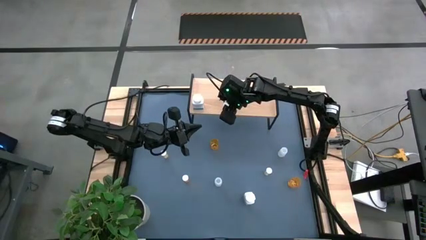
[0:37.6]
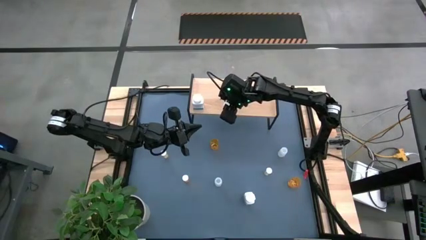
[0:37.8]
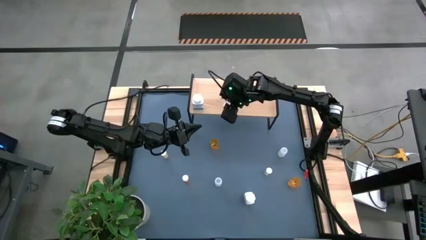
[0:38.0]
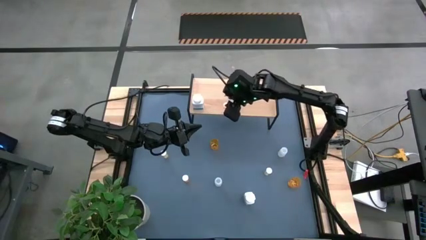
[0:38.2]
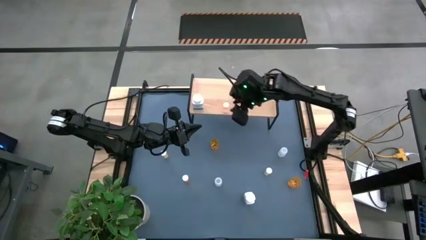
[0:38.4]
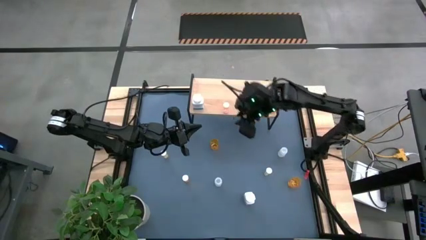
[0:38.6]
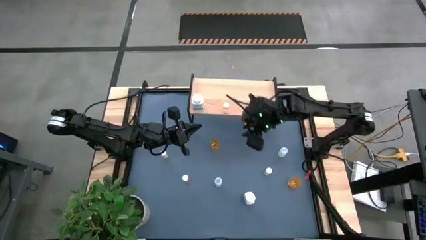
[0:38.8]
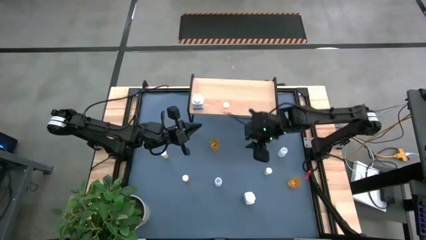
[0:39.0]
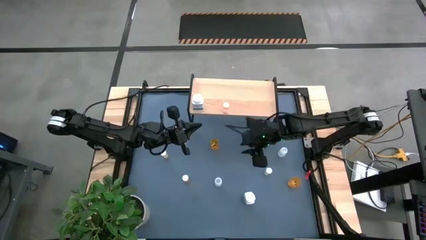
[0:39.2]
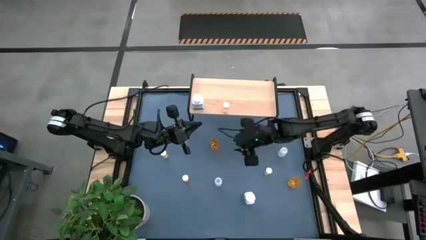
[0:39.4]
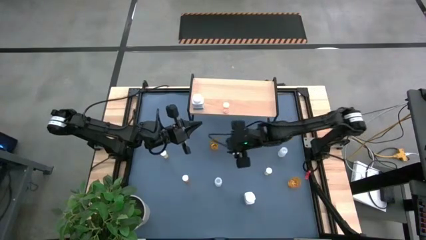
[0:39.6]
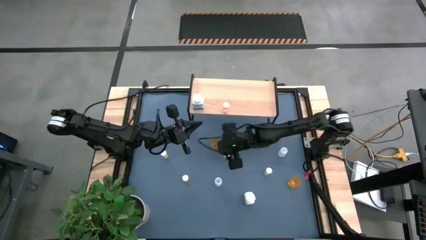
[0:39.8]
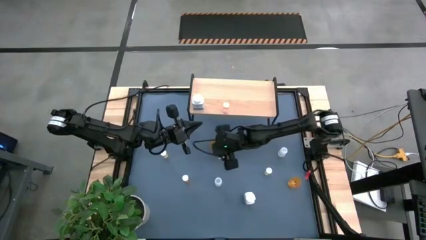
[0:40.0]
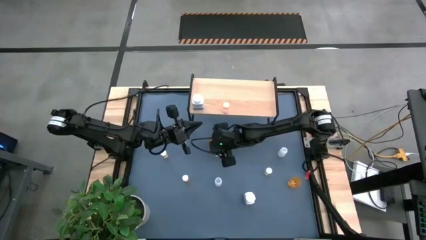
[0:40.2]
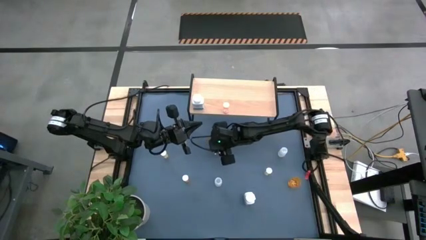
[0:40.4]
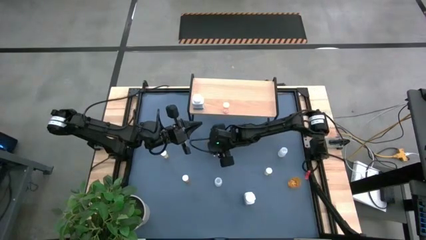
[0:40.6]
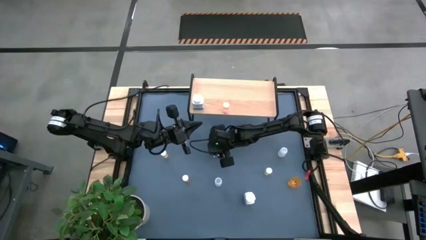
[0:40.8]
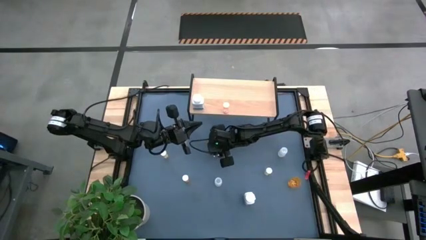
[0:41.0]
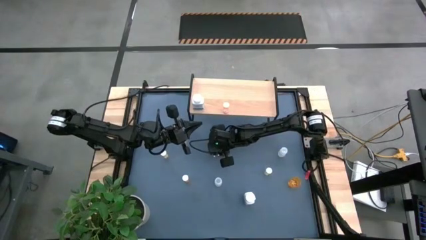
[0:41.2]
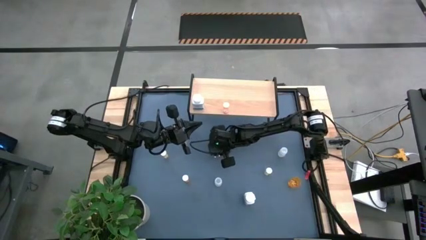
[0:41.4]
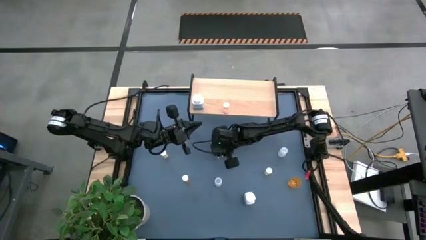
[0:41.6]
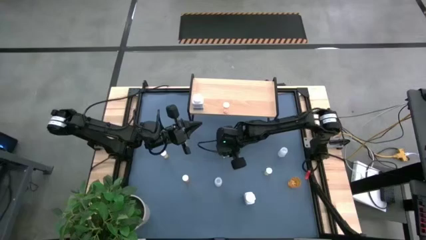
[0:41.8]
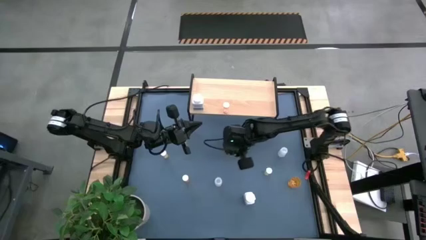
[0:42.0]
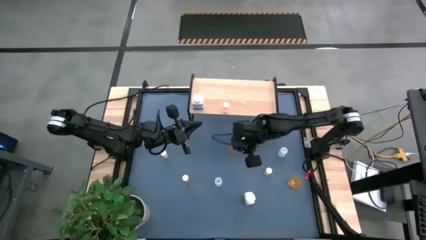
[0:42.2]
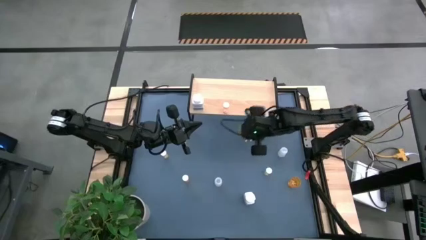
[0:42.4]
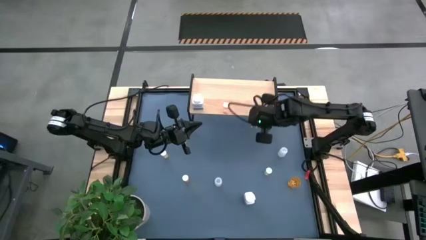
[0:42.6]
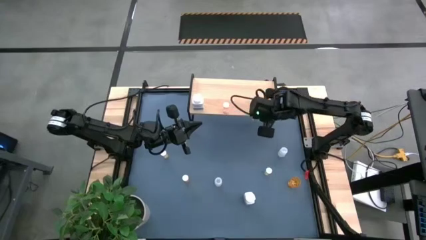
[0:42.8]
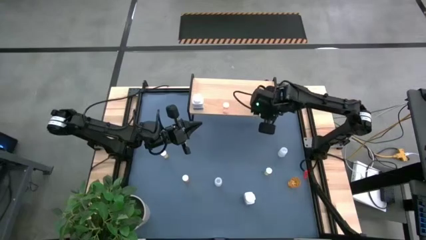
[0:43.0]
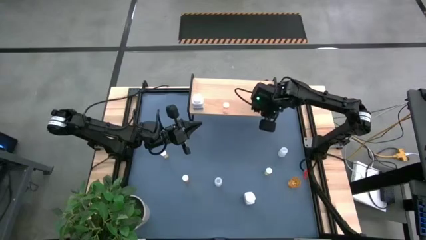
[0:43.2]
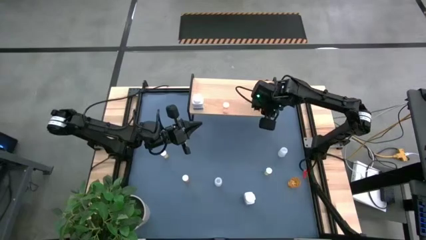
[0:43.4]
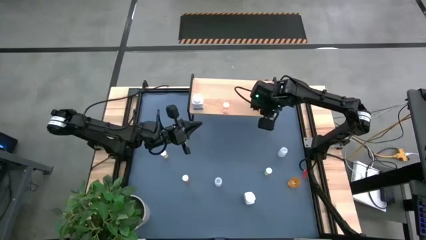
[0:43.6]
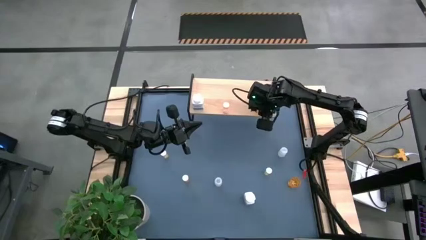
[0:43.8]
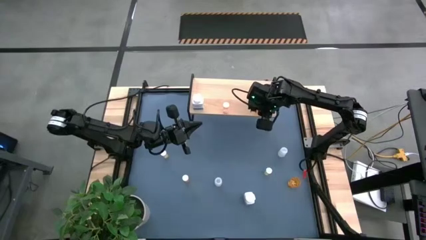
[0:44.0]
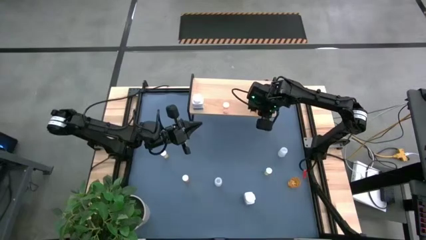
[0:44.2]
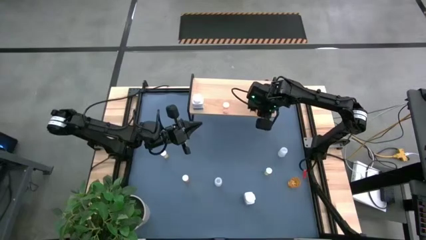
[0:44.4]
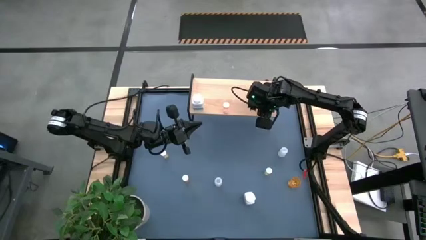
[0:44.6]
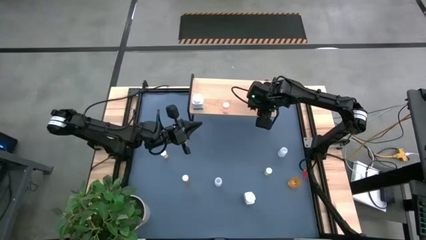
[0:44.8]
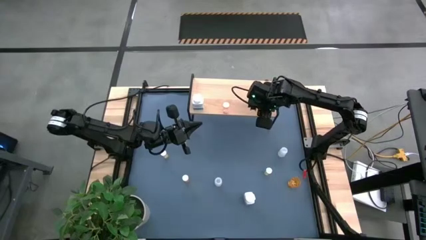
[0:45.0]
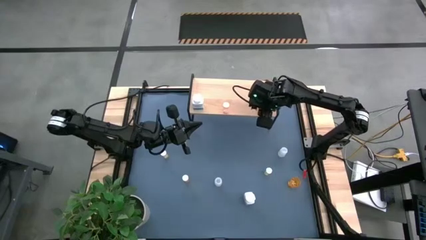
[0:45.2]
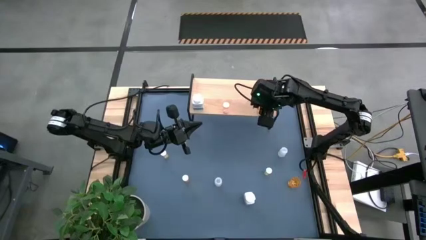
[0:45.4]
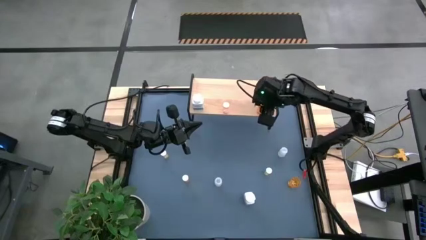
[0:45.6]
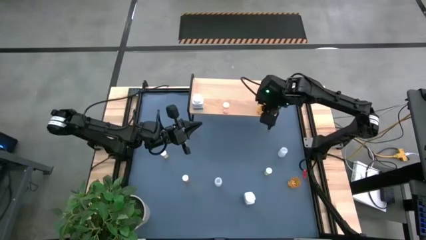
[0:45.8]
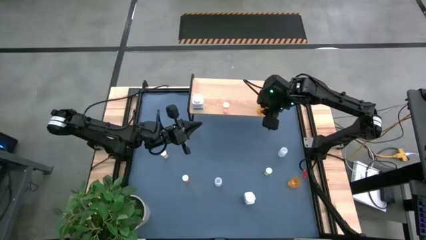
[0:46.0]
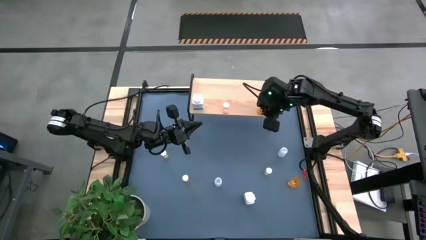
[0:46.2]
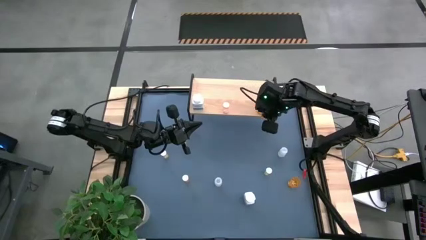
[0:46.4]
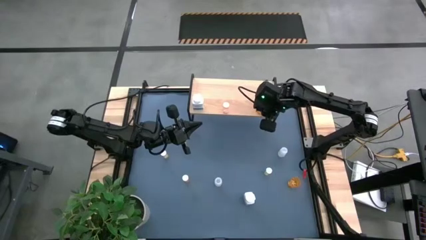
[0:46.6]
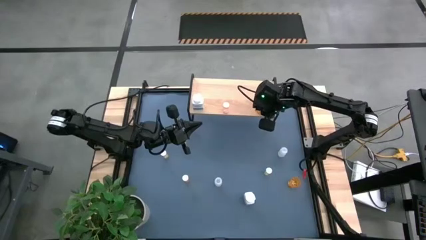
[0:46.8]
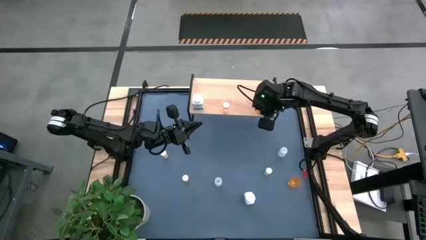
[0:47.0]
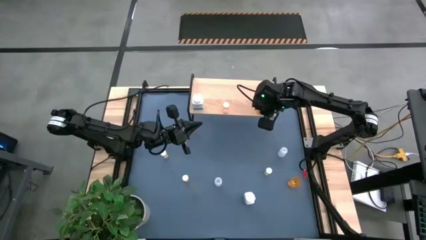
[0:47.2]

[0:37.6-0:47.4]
Task: Pick and place medicine bottles onto shelf by color
Put the left orange pill bottle on the shelf

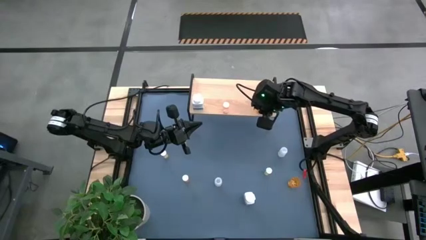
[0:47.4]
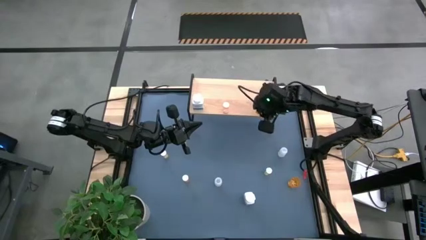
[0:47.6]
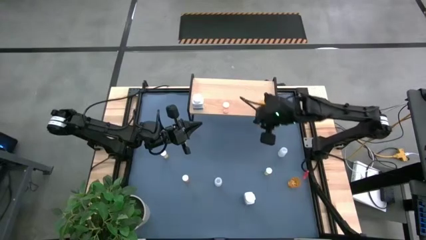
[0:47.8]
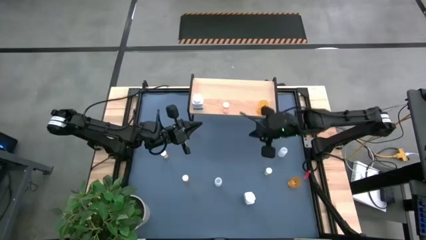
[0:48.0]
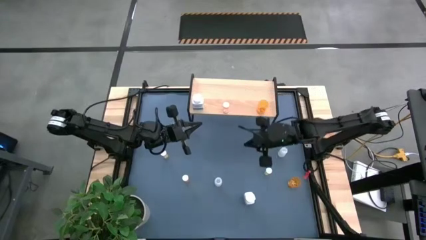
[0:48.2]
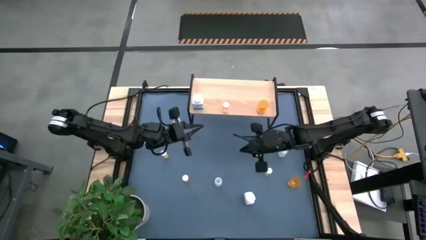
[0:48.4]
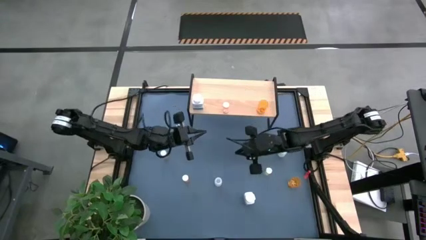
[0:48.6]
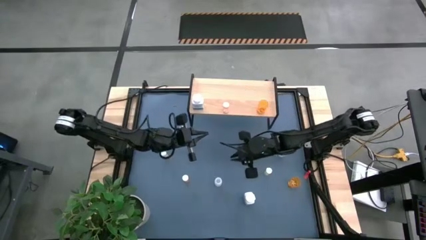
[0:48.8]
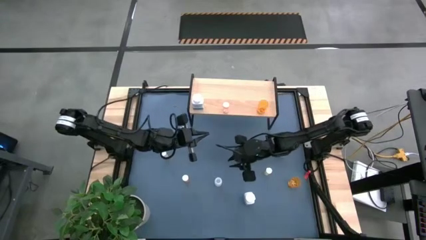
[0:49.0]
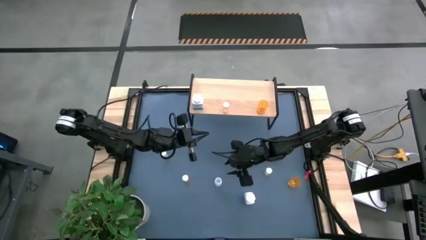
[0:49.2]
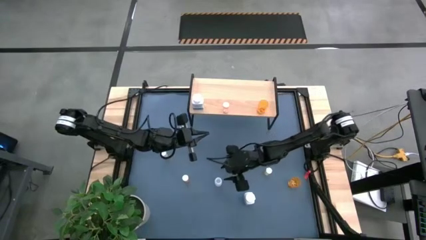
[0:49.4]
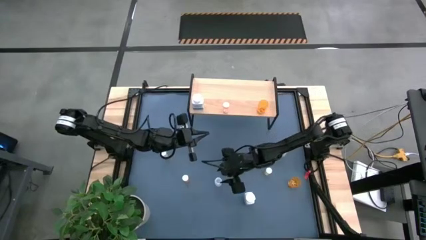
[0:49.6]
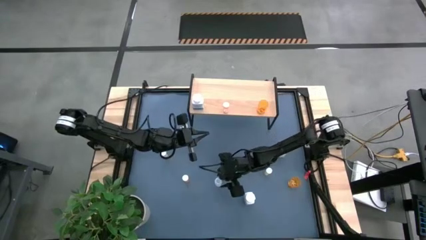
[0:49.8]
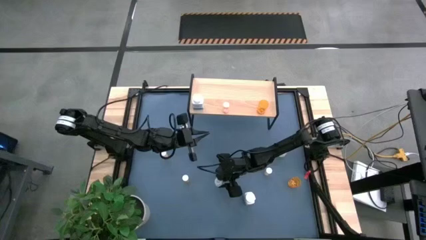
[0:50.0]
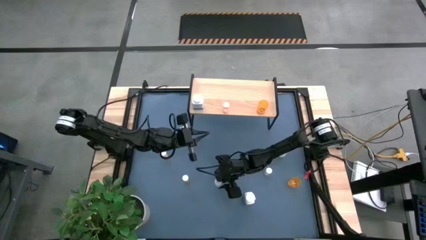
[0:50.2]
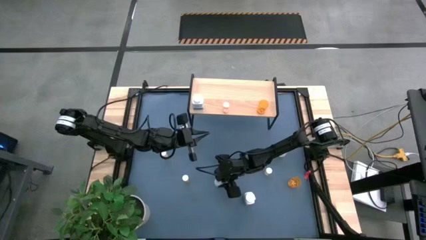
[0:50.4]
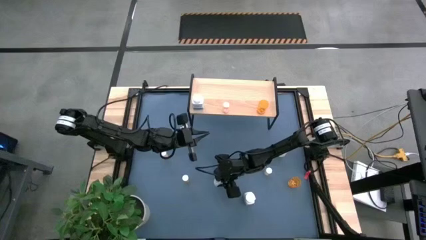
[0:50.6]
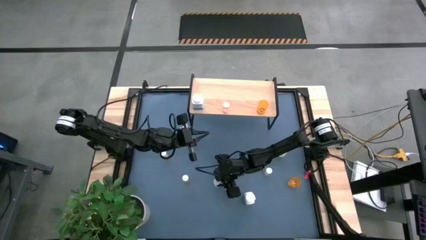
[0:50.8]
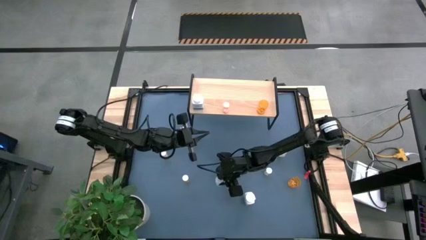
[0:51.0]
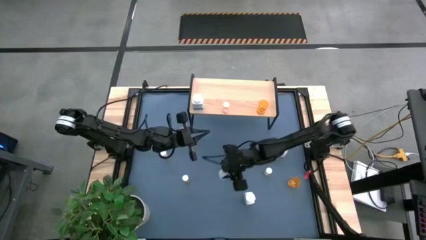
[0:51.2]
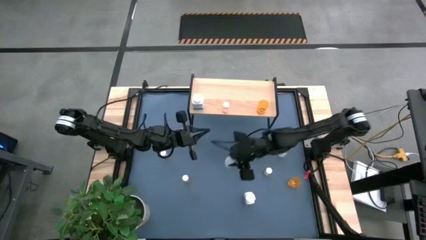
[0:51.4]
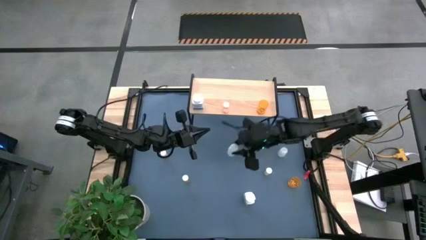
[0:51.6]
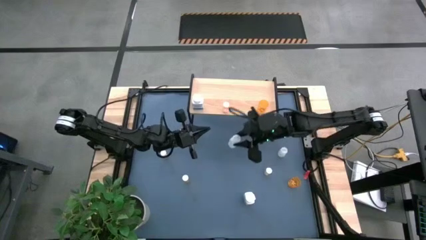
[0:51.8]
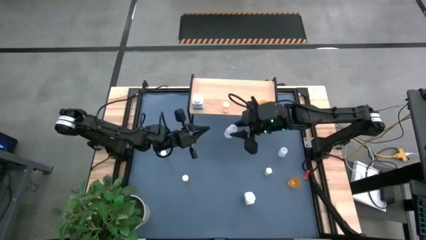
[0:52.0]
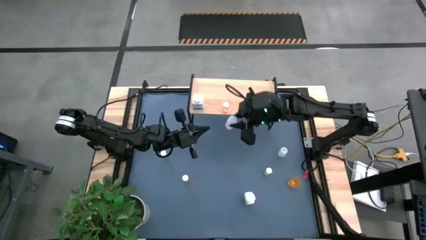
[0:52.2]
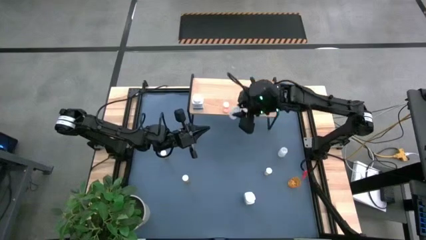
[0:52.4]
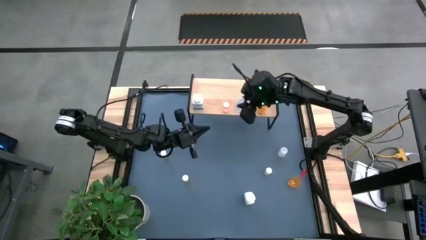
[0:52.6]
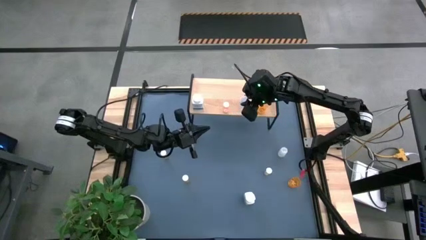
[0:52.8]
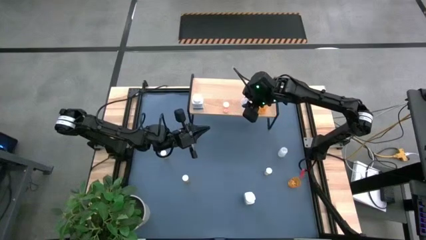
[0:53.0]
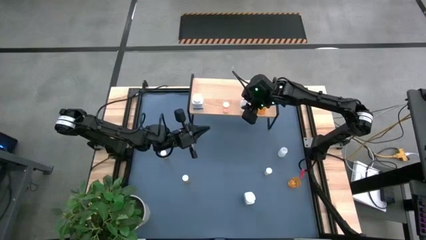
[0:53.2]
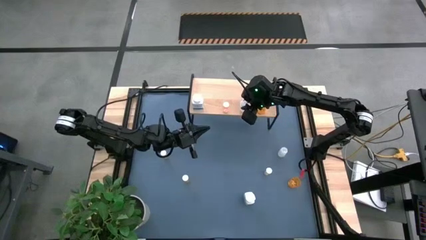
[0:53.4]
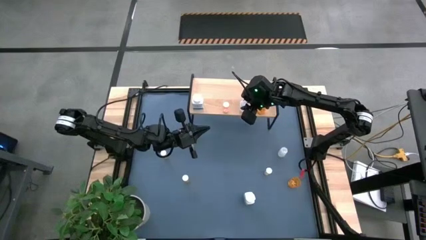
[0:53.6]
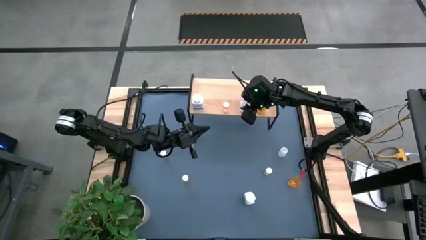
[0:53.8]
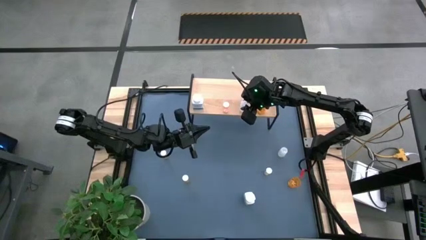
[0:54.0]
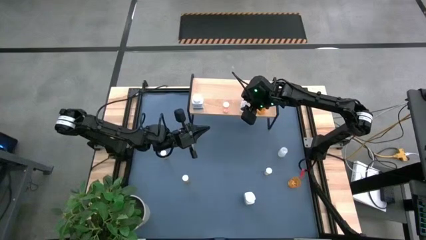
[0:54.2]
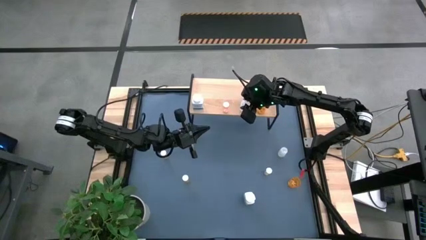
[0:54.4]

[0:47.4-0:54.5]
Put the left transparent pill bottle on the shelf
